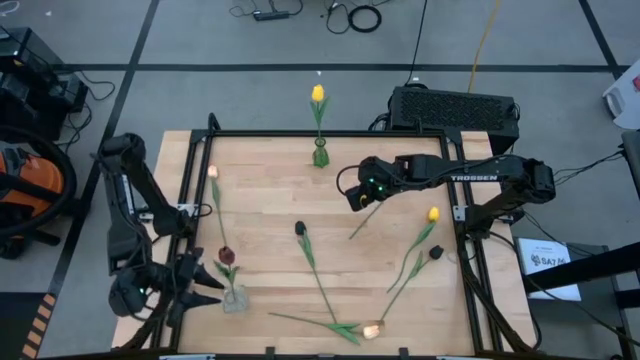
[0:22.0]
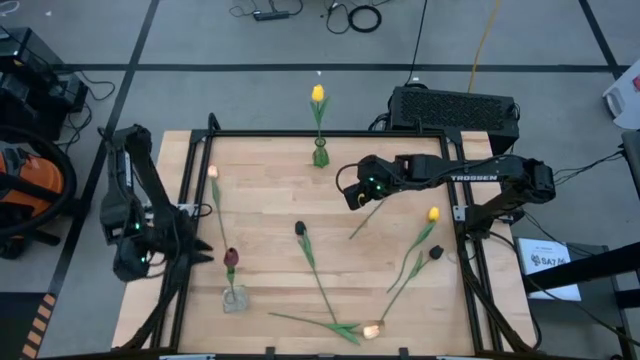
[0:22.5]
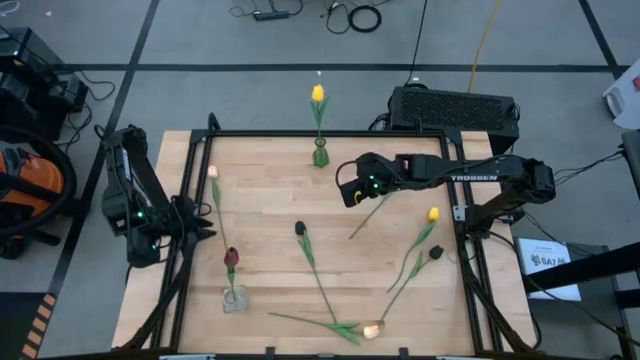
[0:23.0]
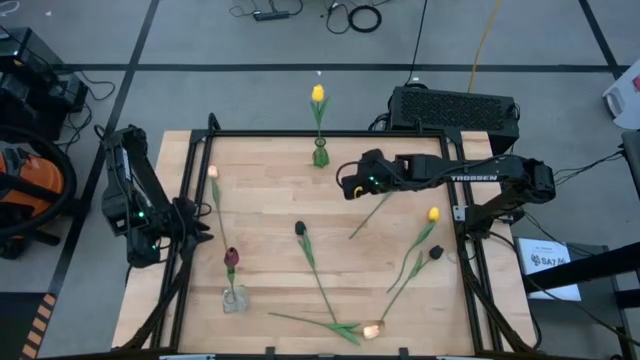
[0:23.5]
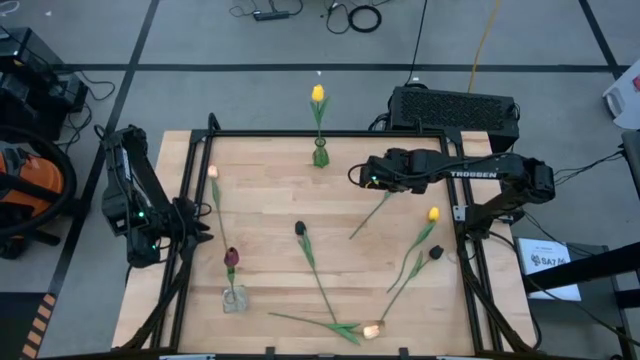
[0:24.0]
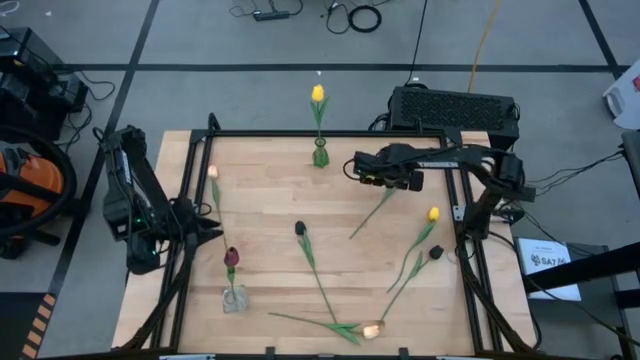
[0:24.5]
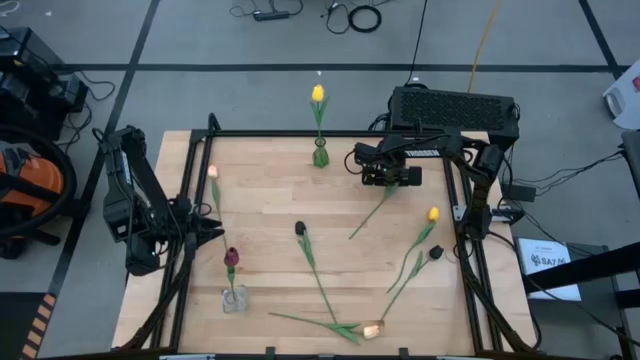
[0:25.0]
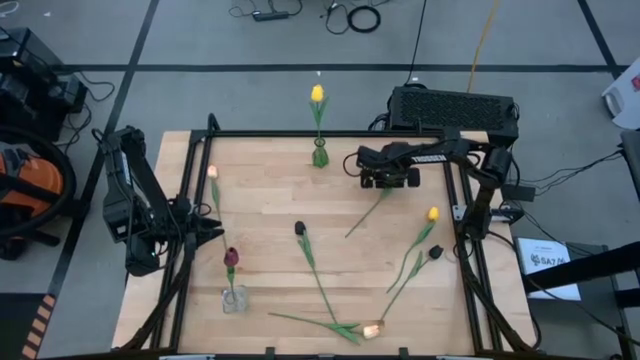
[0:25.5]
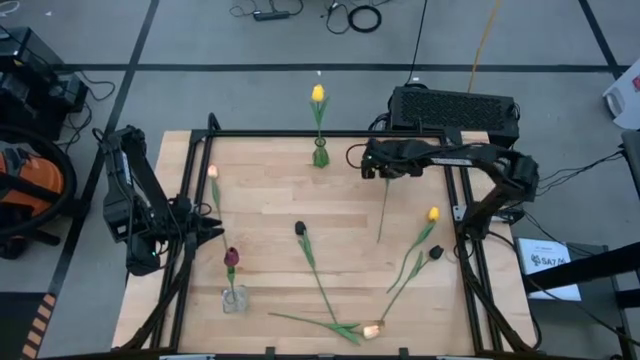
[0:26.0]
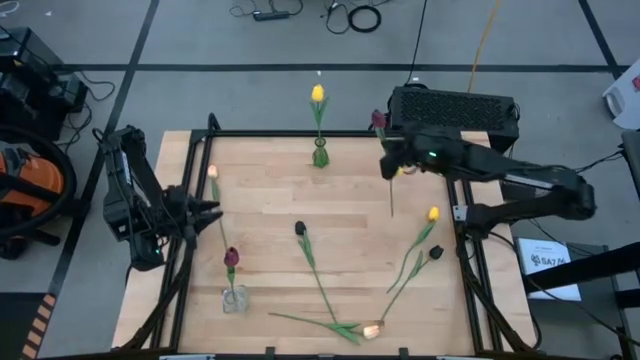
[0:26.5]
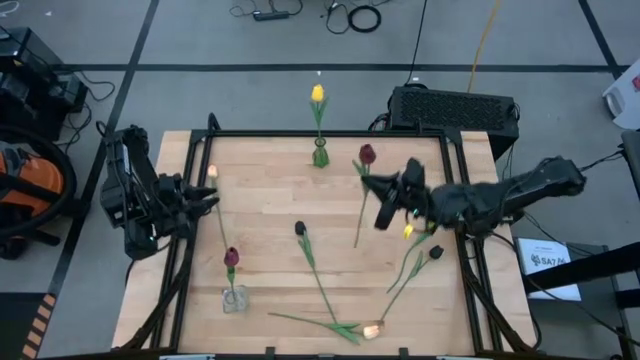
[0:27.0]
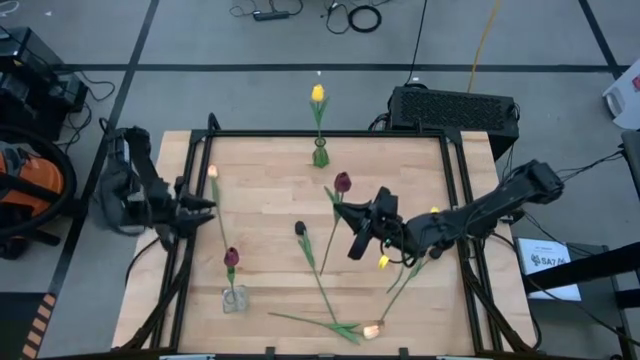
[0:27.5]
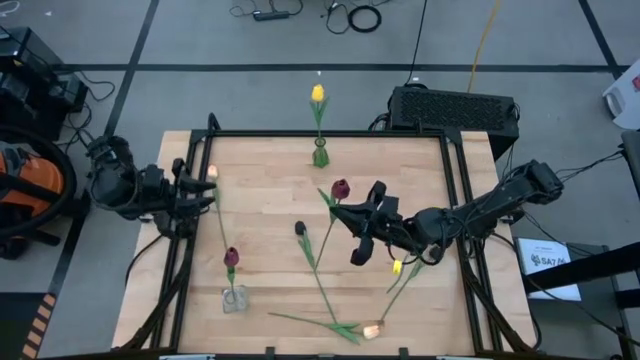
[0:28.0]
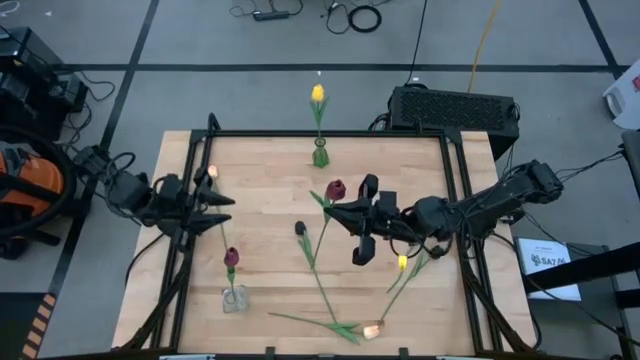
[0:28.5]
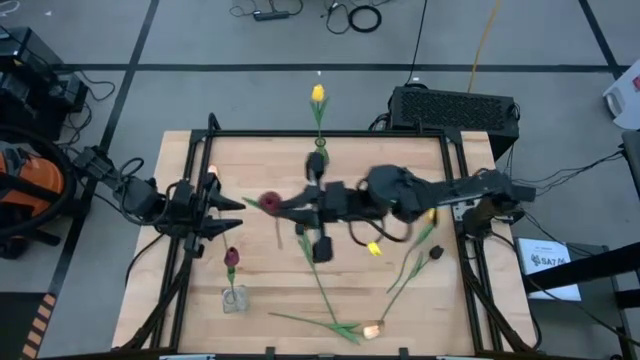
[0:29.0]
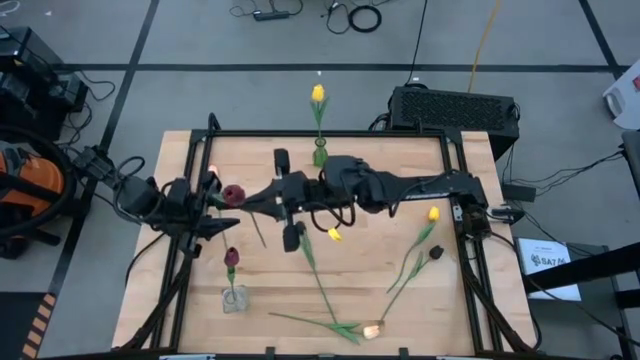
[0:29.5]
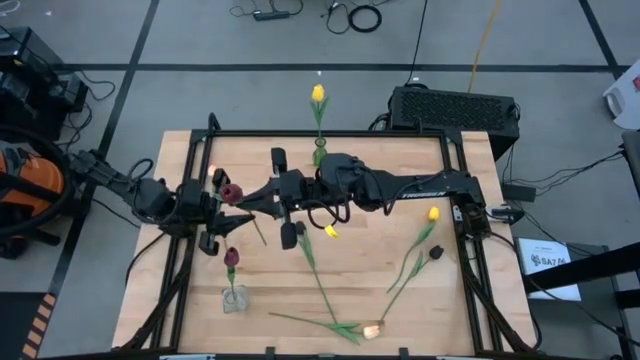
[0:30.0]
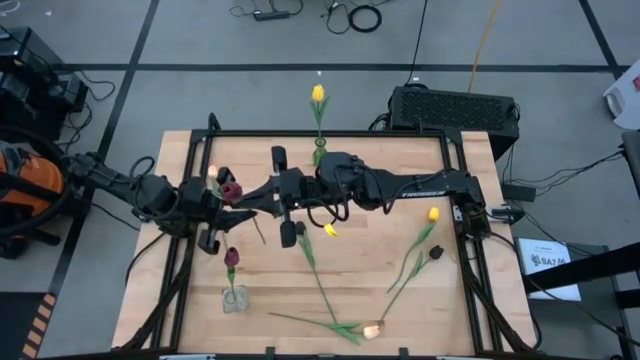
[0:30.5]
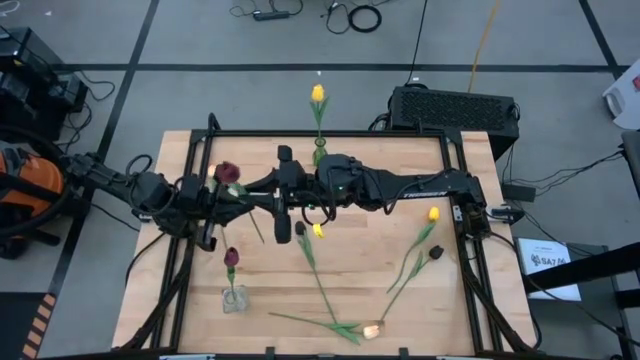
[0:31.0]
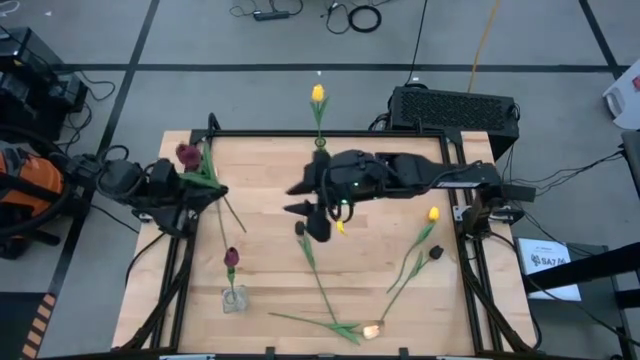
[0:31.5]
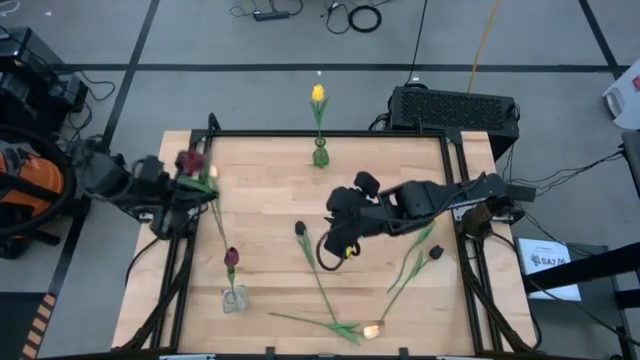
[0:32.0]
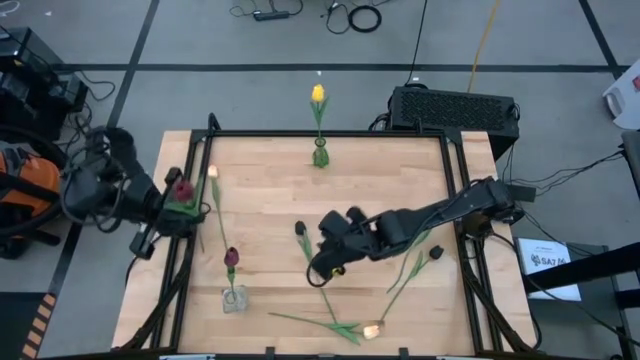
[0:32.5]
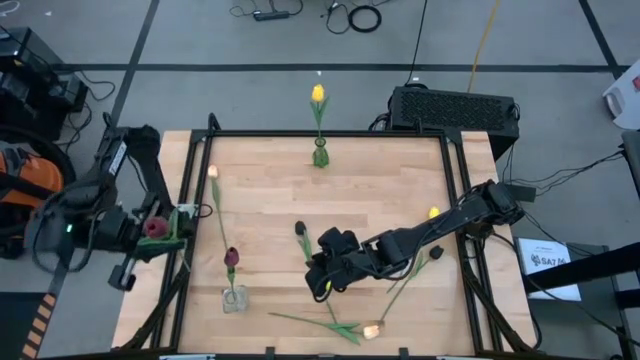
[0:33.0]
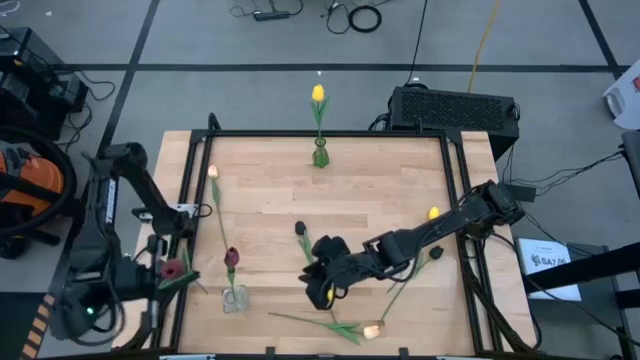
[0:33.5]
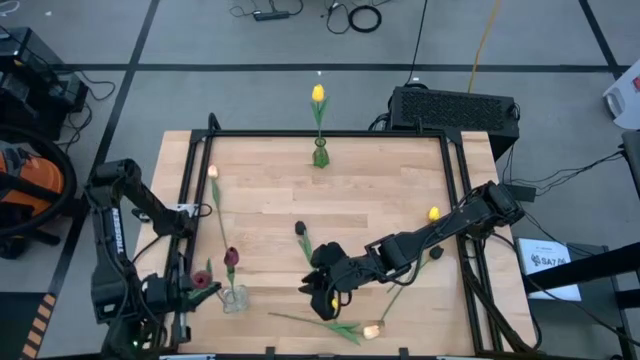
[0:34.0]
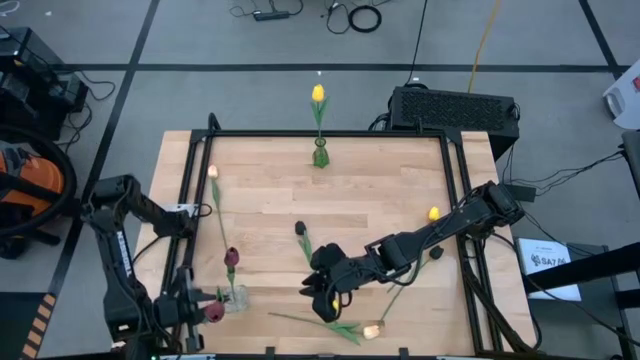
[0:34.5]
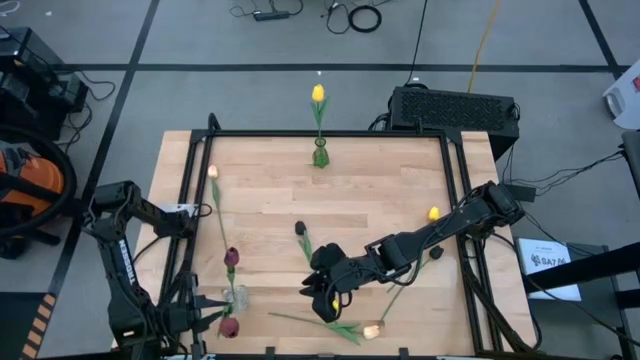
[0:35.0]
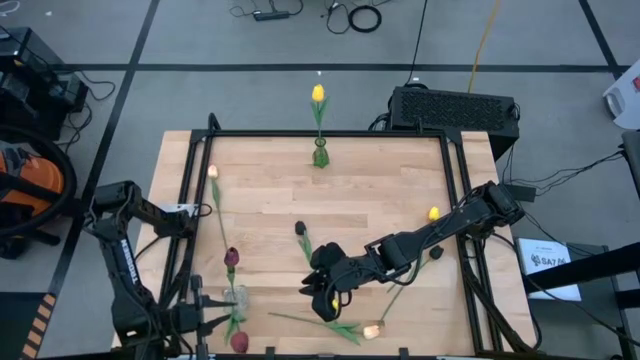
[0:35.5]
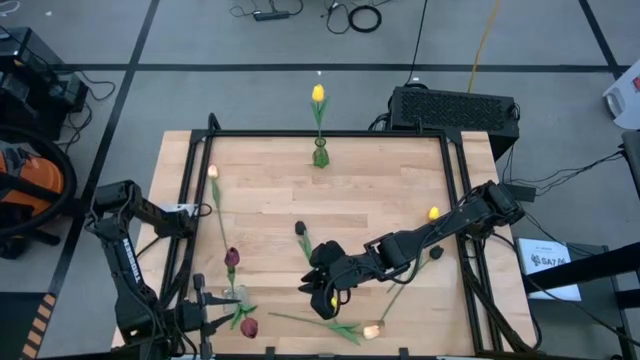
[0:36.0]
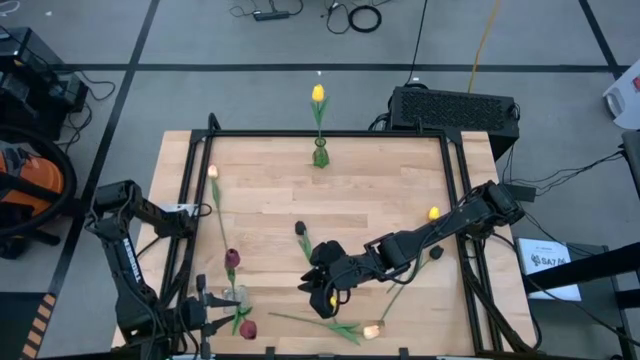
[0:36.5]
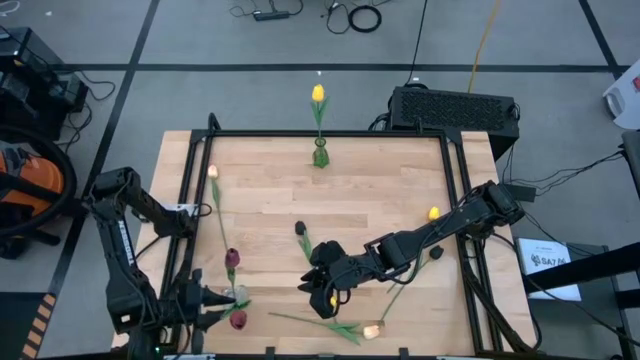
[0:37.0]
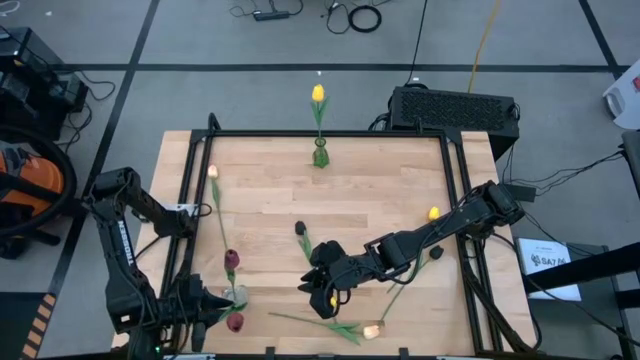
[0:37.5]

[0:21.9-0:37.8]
Task: Sort flowers into vase by color
Put the dark red flower into the transparent vase

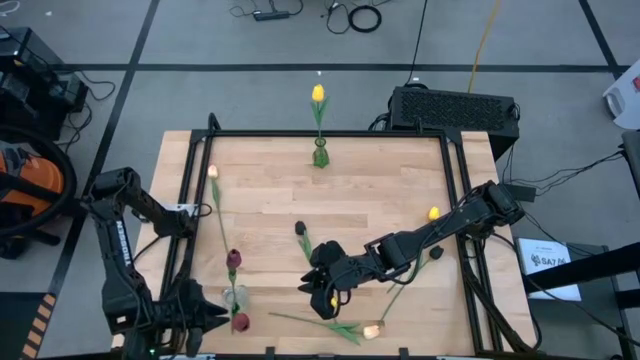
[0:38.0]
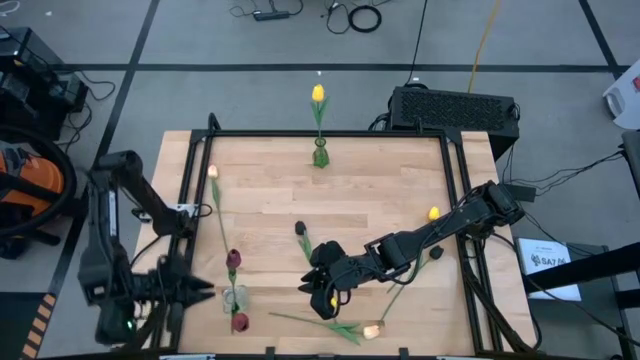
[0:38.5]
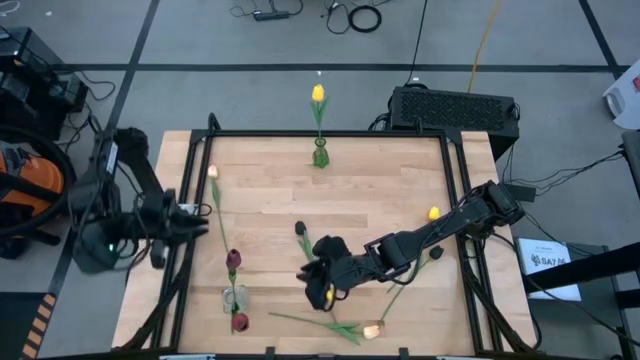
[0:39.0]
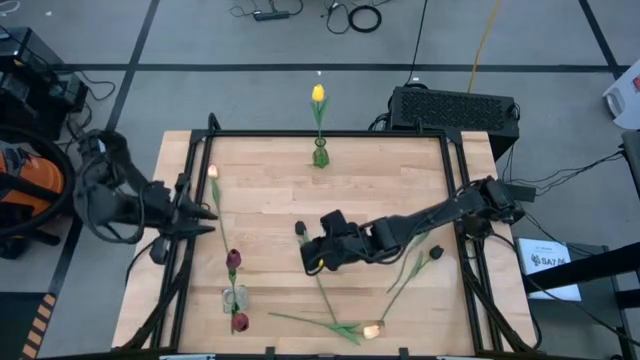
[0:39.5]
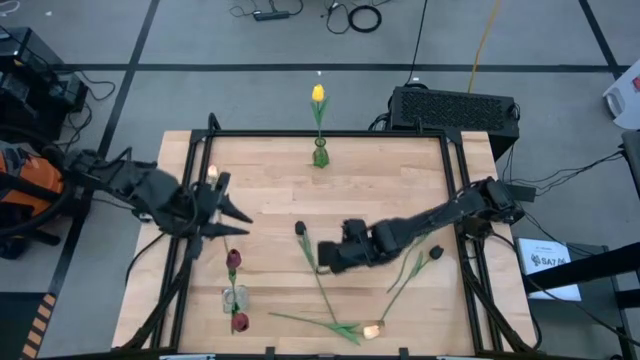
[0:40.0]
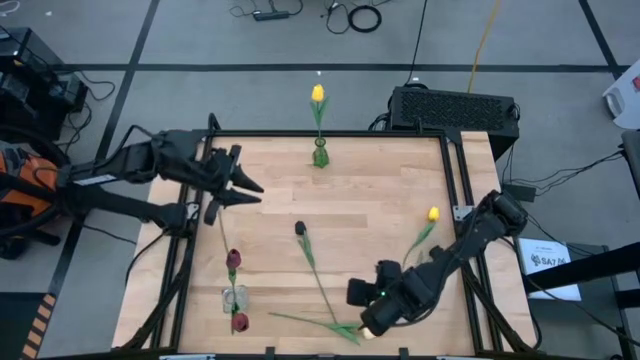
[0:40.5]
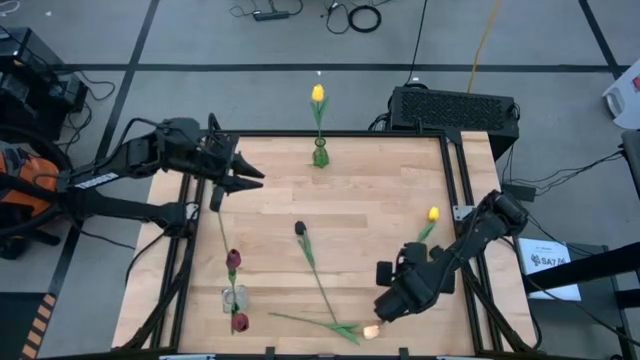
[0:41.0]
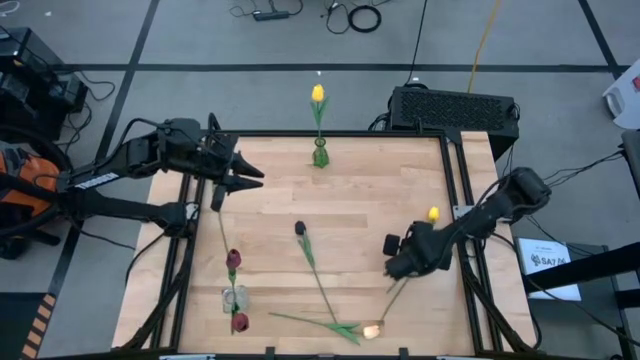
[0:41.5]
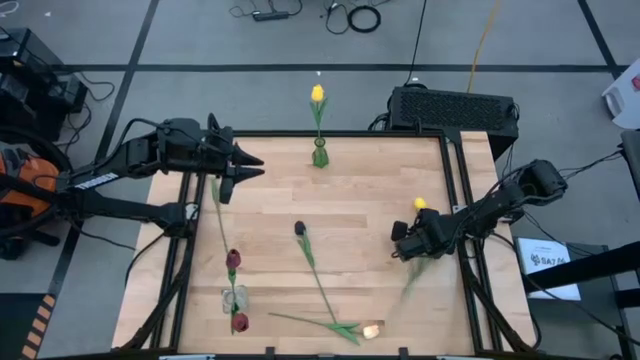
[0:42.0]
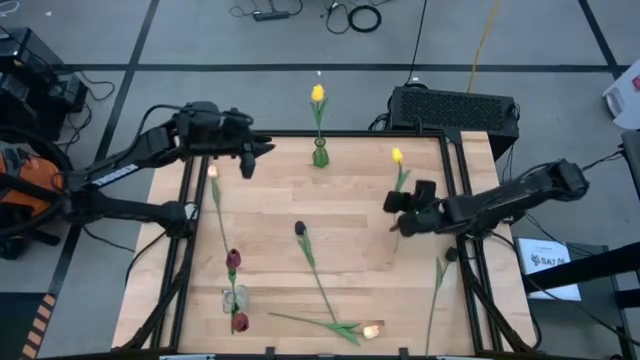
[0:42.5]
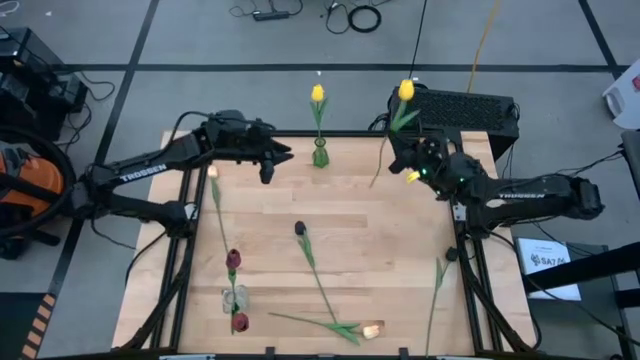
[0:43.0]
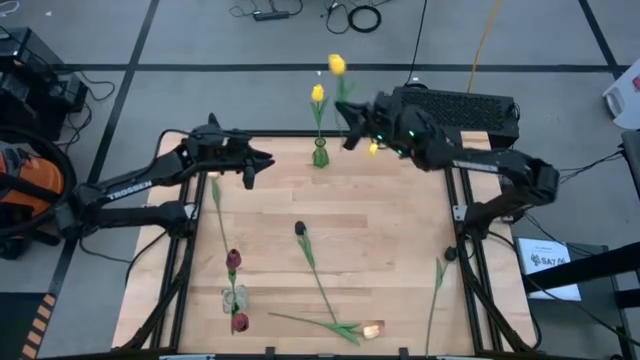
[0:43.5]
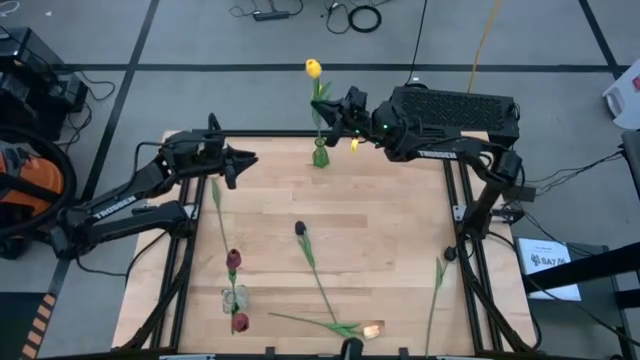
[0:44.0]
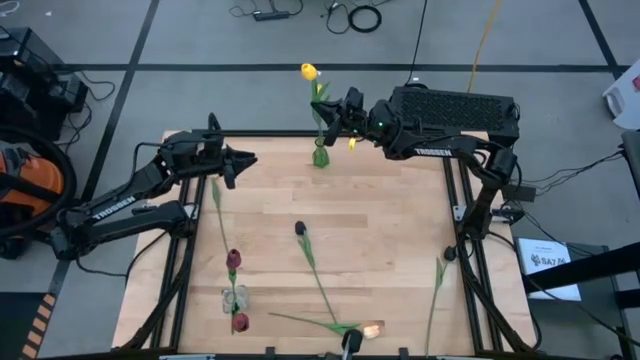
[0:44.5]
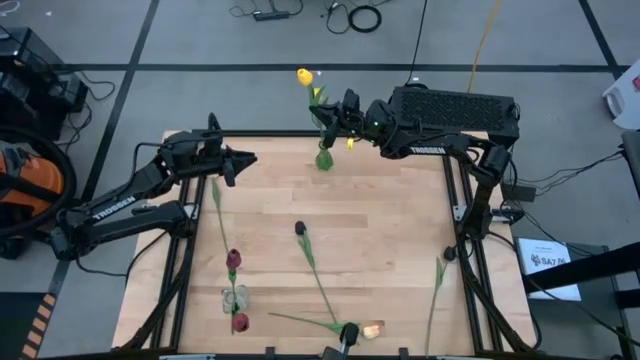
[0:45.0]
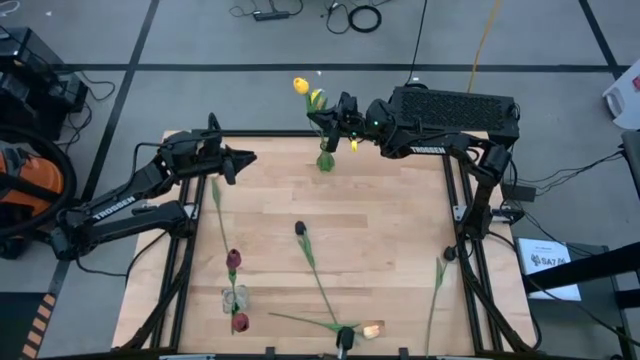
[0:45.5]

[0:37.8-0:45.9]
Put the yellow flower into the green vase
